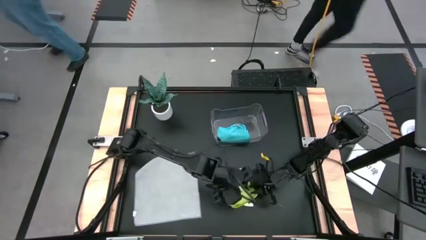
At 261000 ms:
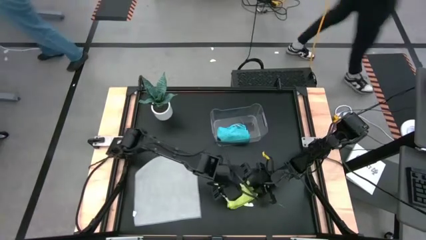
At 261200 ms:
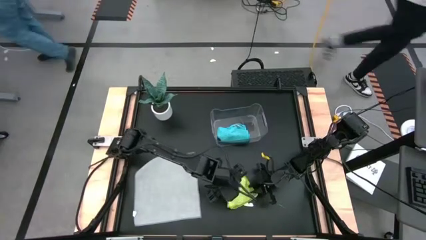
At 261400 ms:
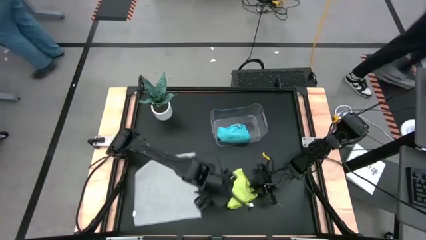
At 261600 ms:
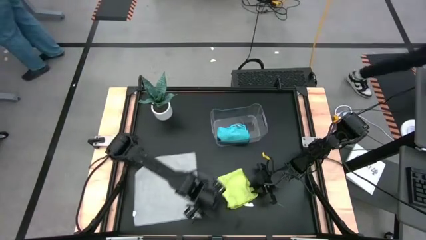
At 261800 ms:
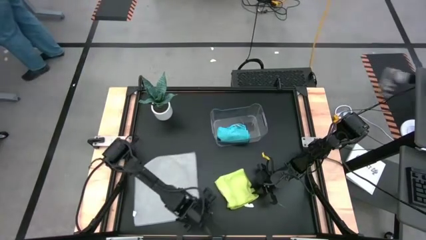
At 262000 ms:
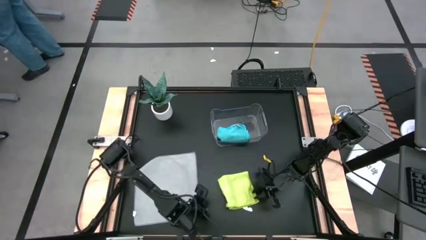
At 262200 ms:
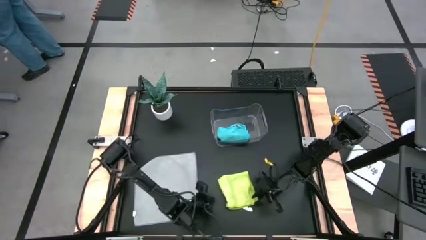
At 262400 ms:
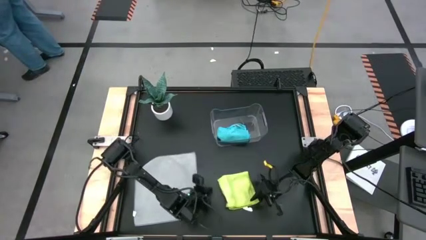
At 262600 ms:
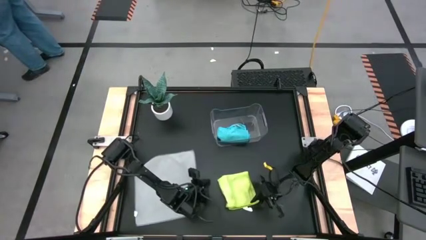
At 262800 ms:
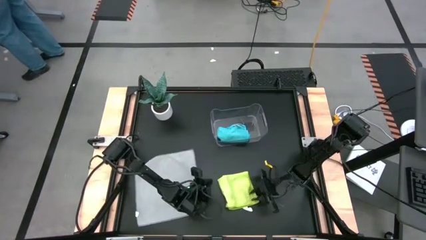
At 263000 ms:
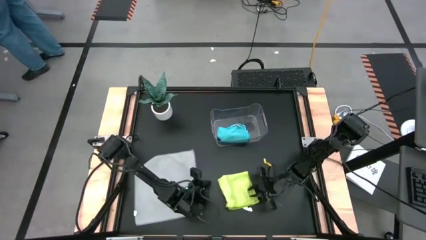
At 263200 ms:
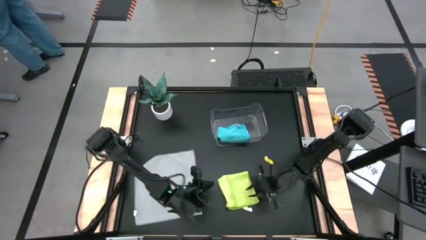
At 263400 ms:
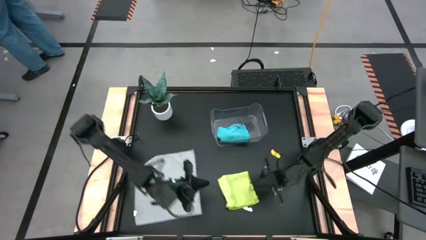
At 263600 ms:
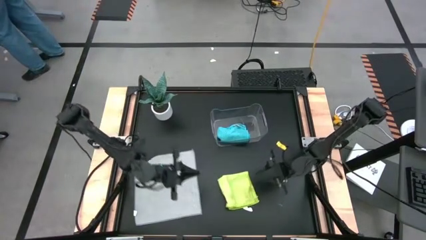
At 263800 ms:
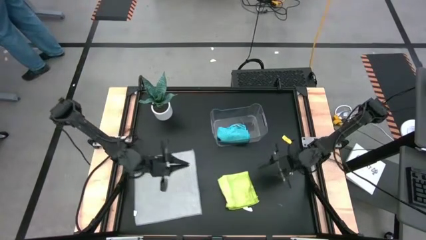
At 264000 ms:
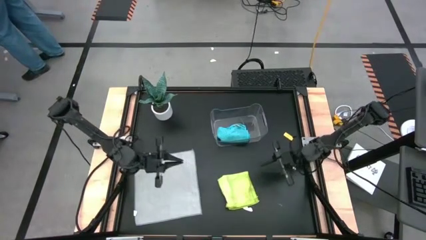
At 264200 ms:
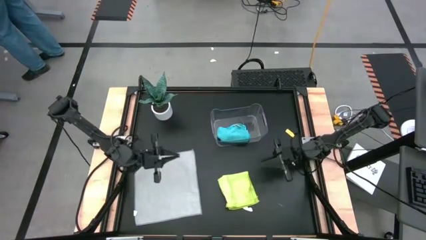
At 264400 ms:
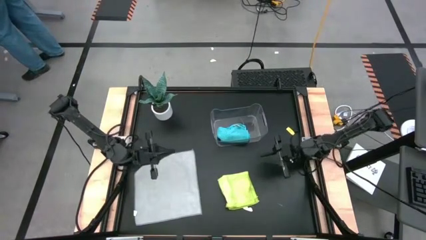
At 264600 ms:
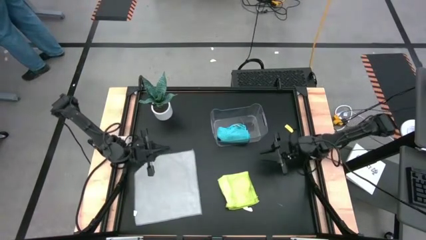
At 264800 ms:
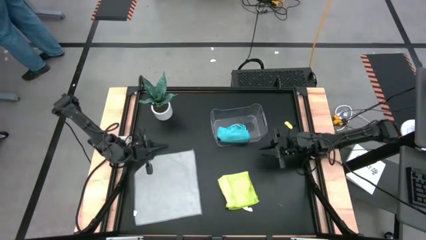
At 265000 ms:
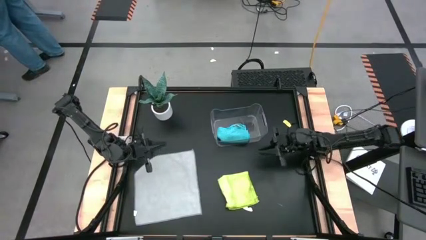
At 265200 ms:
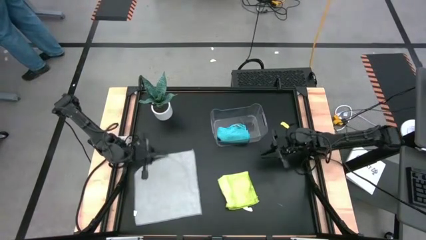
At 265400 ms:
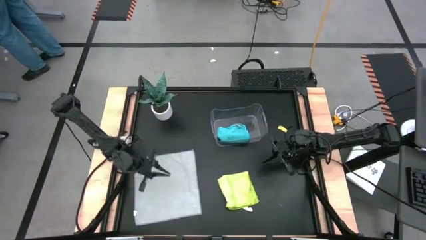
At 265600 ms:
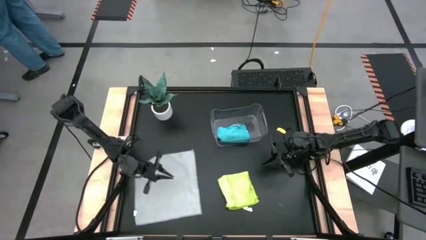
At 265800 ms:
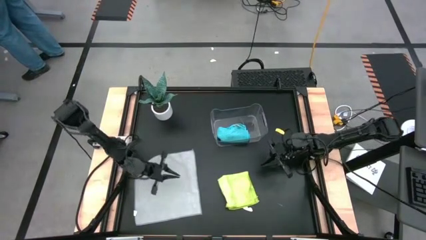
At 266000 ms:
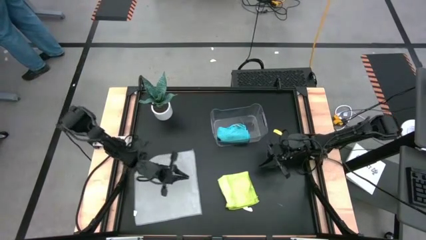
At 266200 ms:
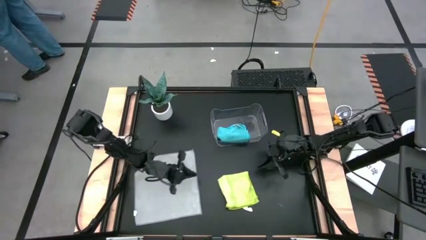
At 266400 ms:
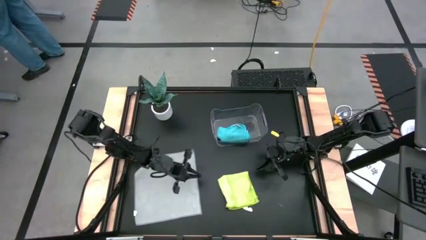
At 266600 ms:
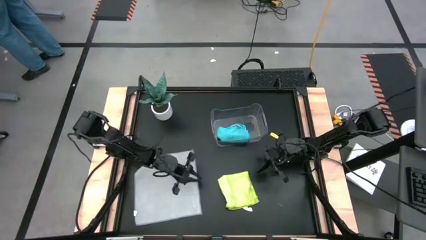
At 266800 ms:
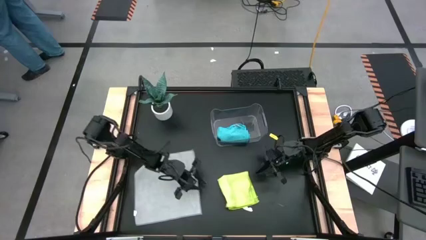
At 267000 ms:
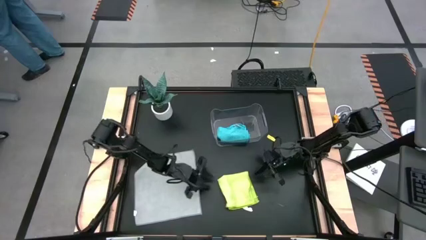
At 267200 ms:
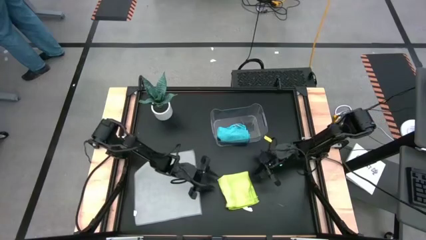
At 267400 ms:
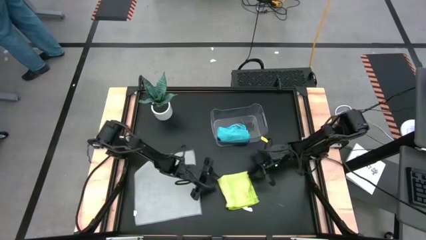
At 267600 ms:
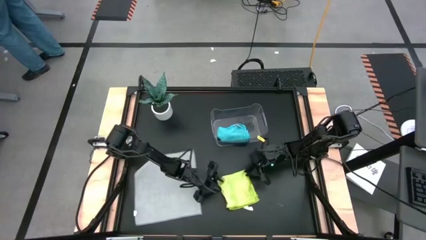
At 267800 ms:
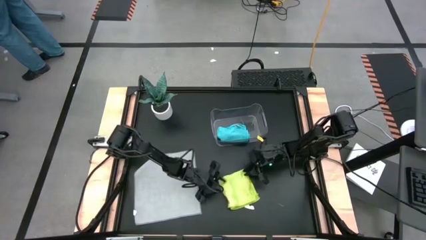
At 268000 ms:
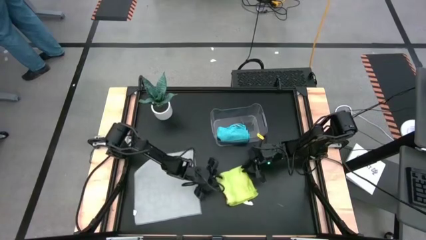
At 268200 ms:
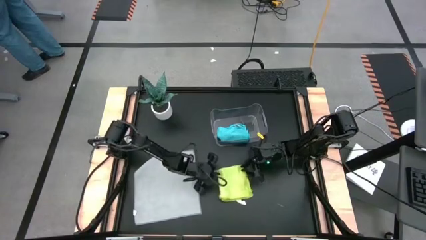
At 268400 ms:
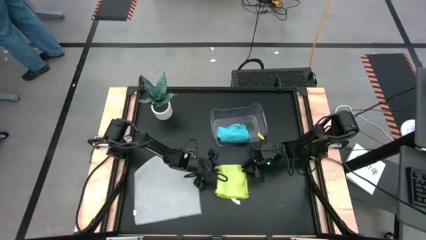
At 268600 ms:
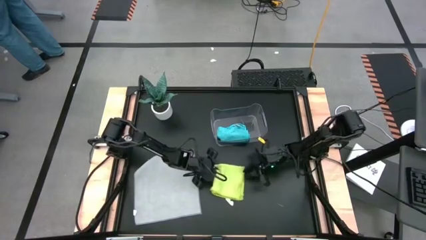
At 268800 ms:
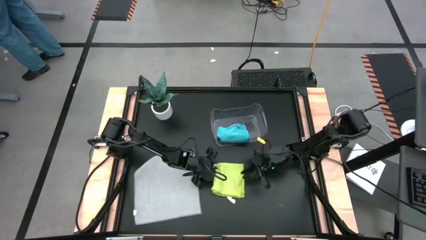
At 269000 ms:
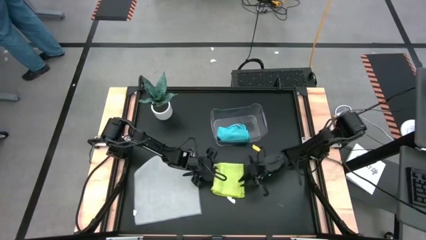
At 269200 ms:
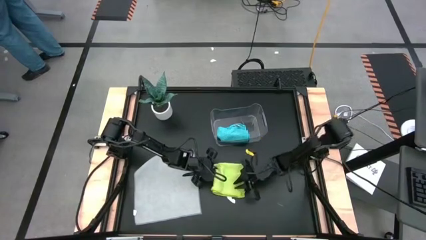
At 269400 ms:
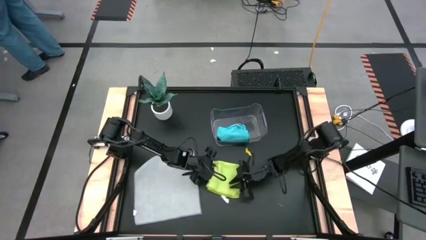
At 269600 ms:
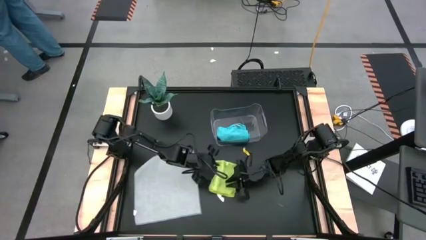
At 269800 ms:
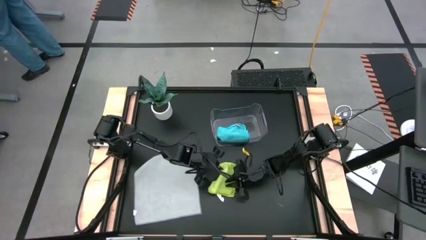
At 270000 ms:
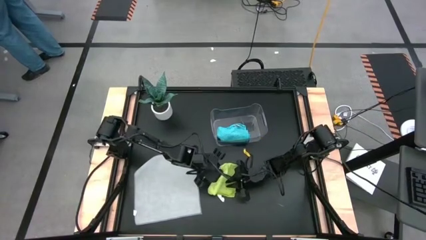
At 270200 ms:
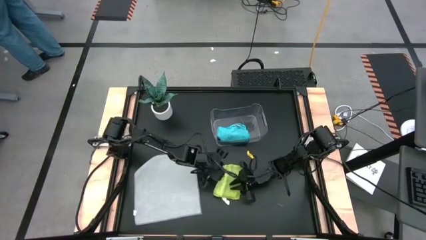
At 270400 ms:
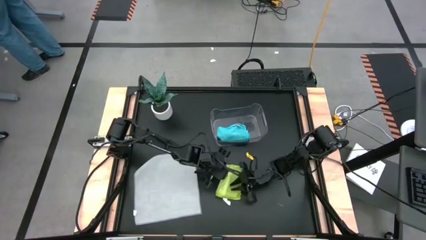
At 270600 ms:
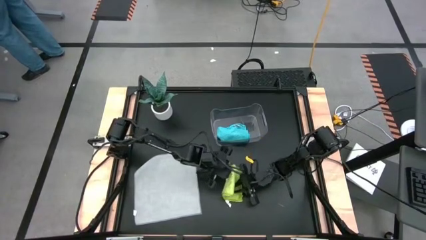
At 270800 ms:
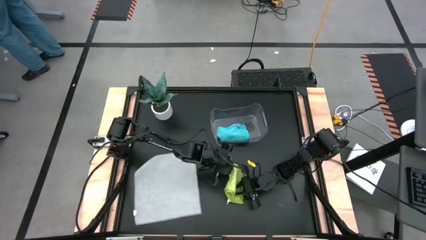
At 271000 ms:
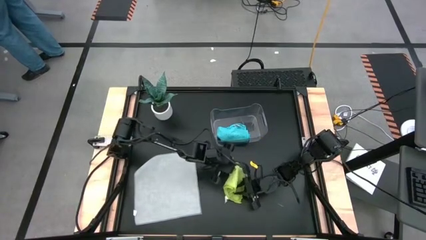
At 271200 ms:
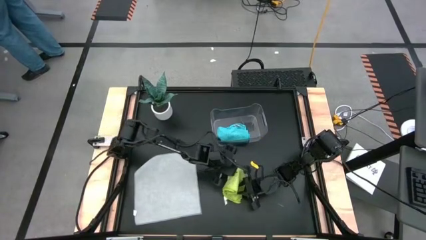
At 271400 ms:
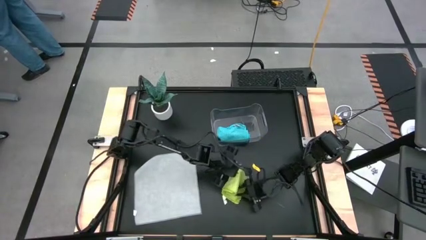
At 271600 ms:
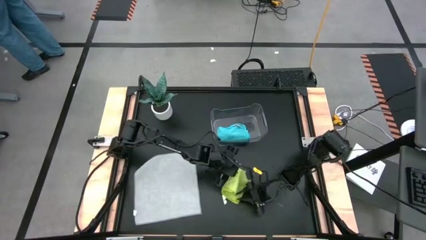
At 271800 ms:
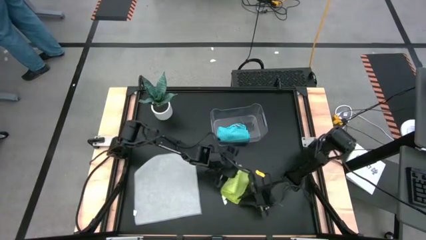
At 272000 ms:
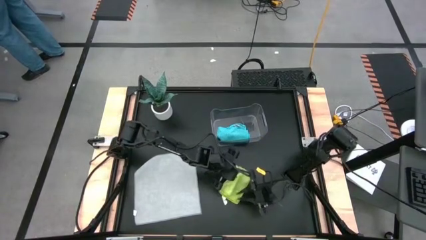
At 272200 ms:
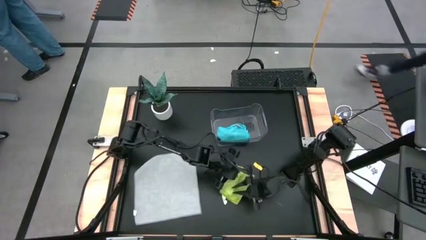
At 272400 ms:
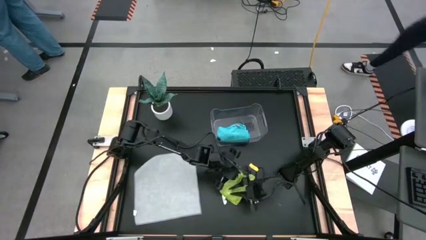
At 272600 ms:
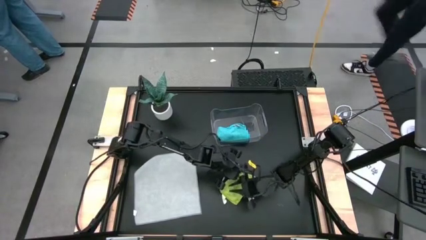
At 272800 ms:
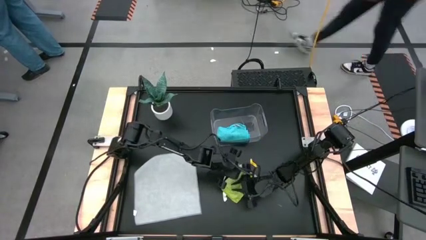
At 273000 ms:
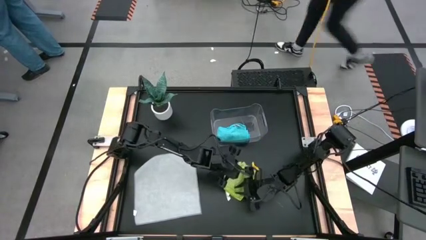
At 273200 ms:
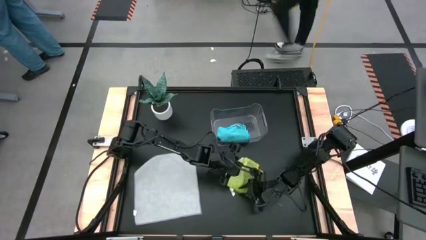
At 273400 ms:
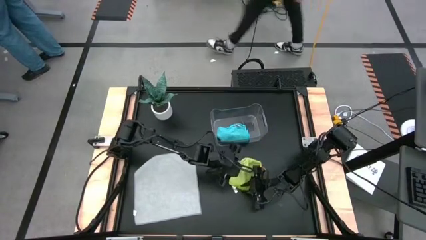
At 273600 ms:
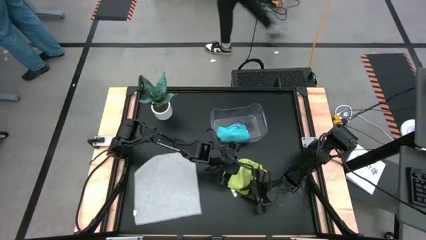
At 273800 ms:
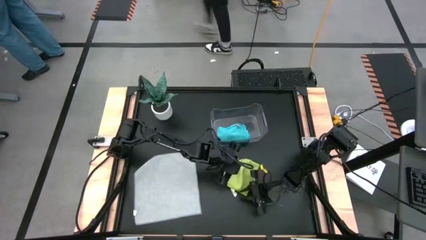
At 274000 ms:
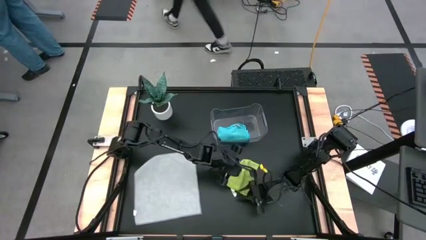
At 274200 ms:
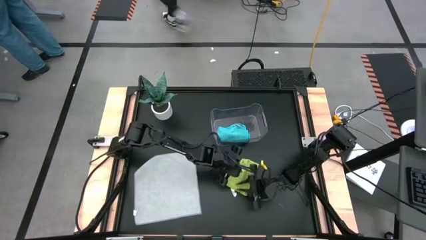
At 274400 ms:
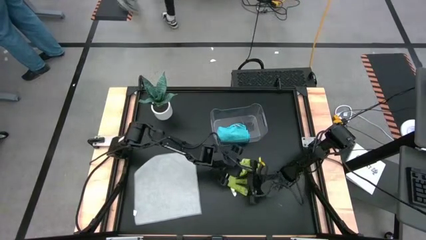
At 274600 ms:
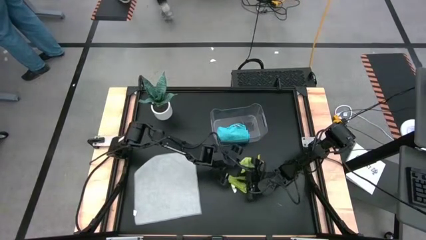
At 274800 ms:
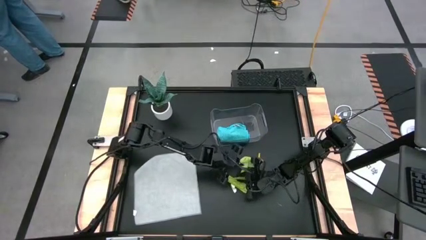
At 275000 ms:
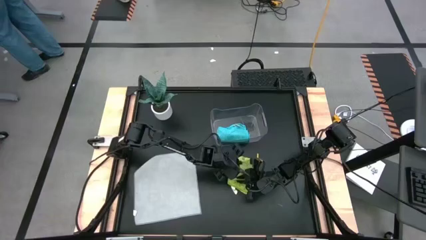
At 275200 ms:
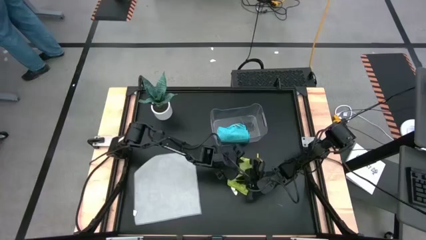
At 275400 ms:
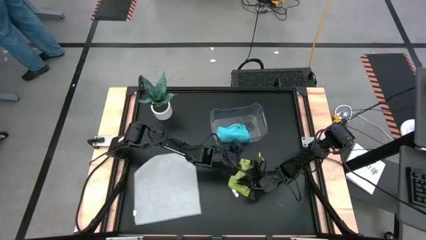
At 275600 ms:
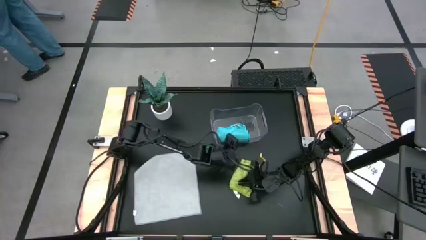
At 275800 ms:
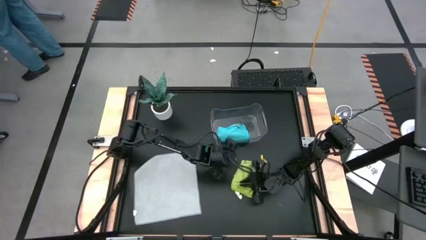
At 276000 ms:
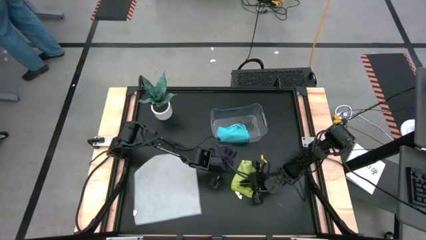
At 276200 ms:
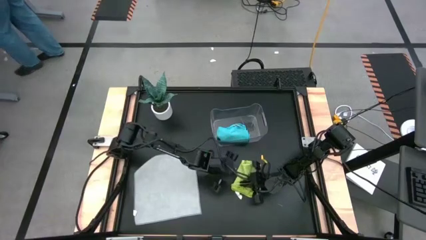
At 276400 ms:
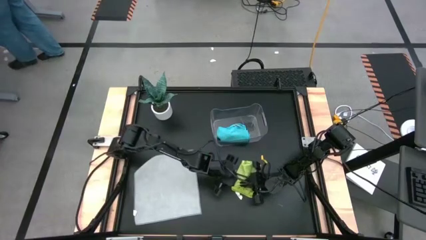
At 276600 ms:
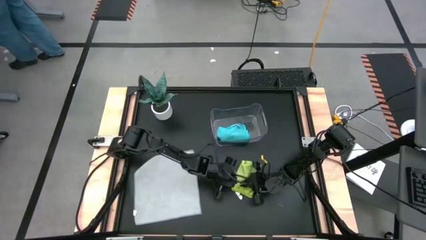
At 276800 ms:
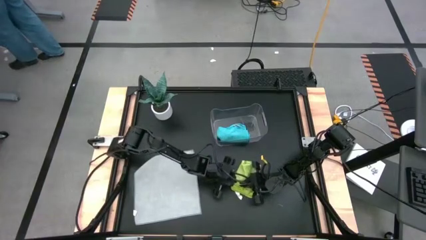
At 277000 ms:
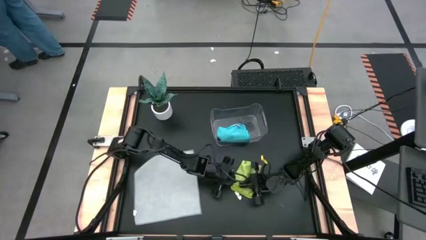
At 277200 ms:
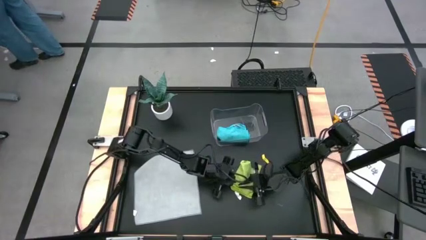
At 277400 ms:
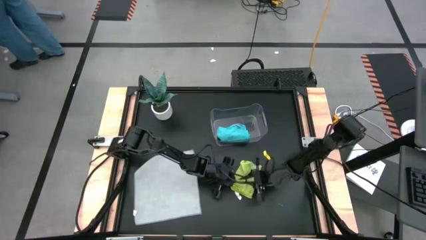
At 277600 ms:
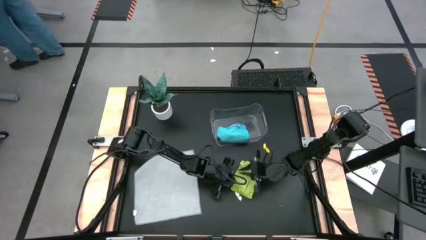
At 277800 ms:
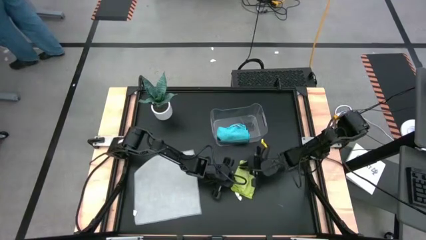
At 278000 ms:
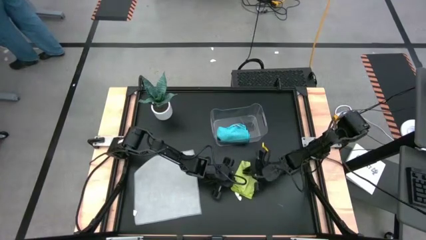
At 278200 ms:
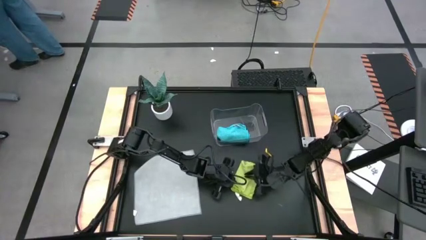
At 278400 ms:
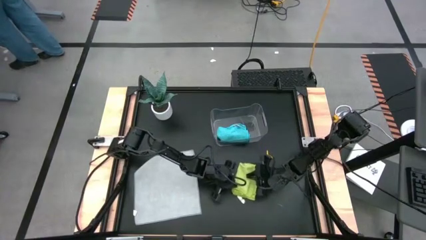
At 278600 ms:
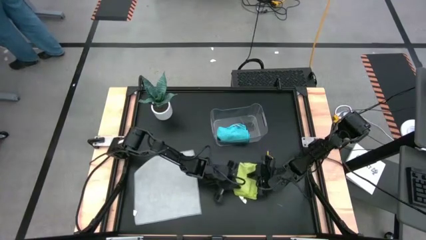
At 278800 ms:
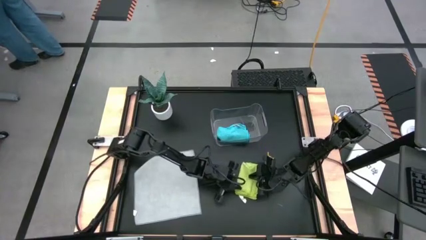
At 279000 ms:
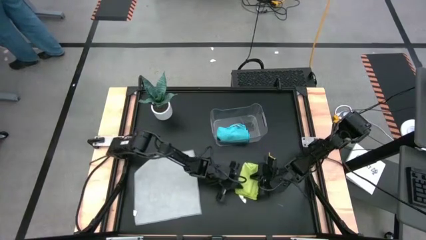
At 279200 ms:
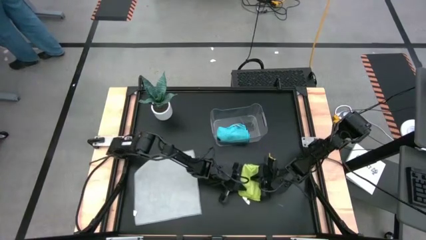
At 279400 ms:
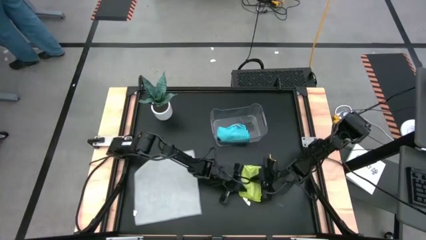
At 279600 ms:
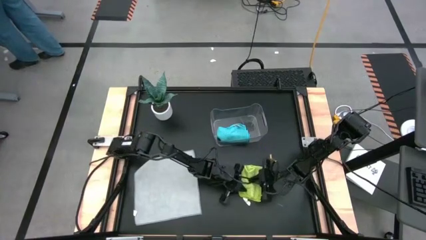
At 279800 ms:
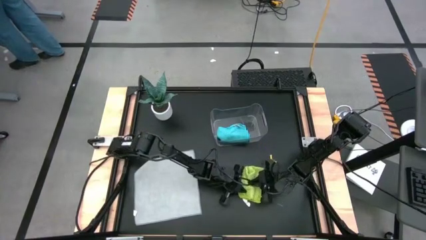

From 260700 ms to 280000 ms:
Task: Fold microfiber towels
Fold the green towel
